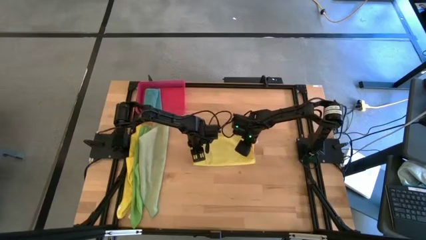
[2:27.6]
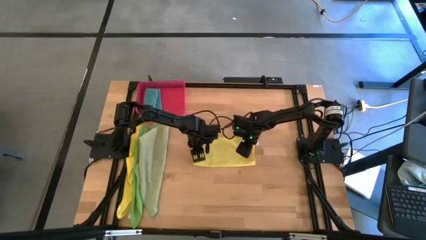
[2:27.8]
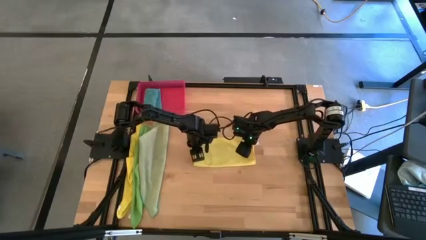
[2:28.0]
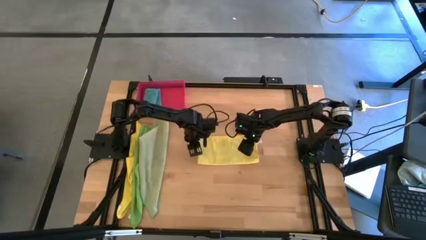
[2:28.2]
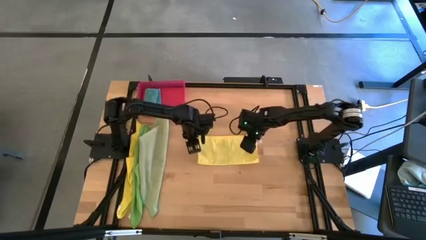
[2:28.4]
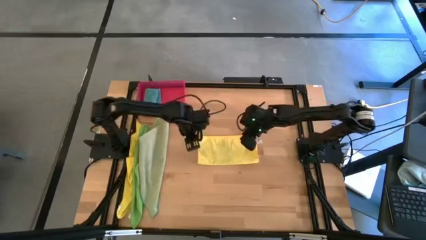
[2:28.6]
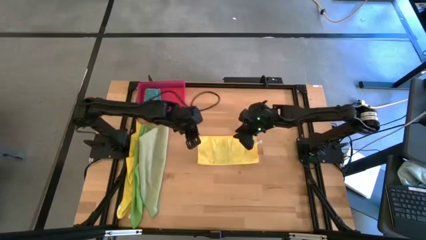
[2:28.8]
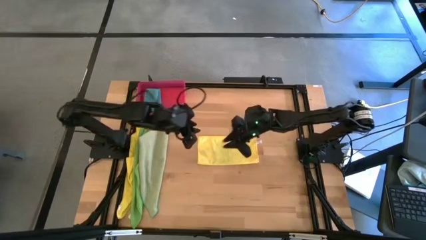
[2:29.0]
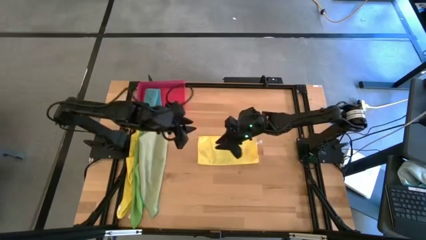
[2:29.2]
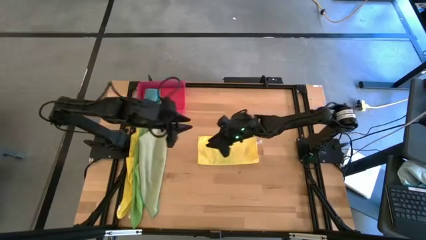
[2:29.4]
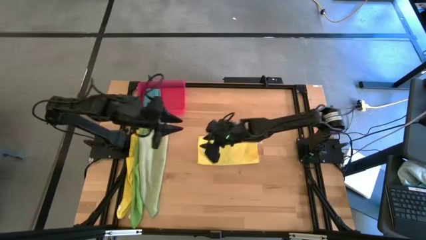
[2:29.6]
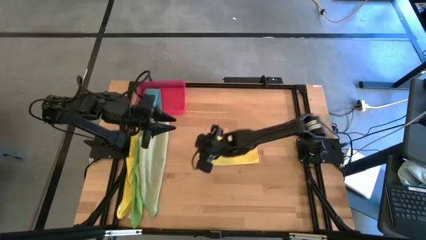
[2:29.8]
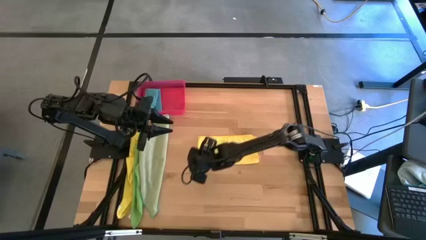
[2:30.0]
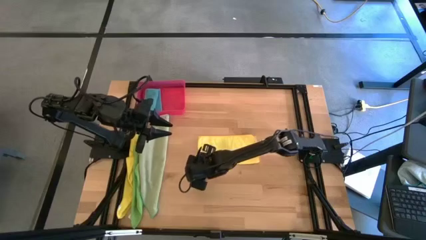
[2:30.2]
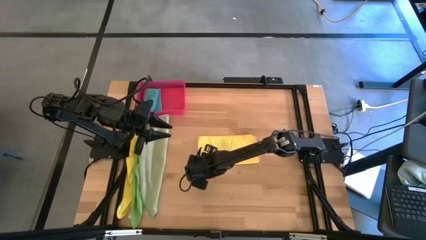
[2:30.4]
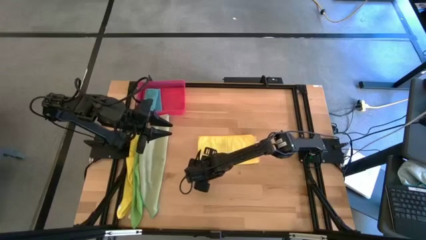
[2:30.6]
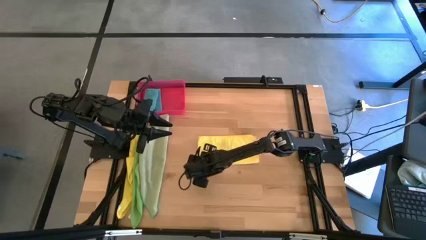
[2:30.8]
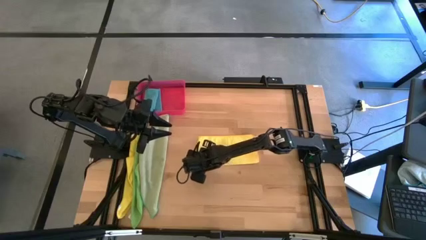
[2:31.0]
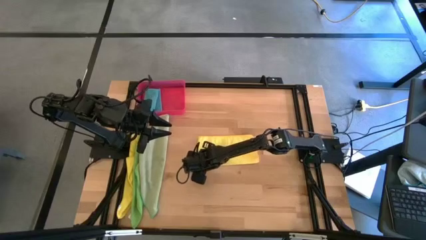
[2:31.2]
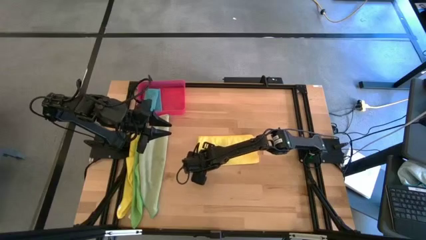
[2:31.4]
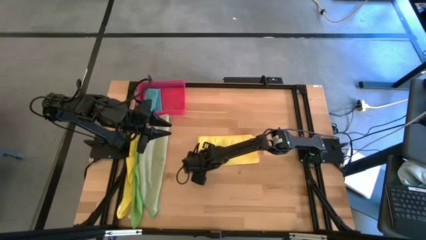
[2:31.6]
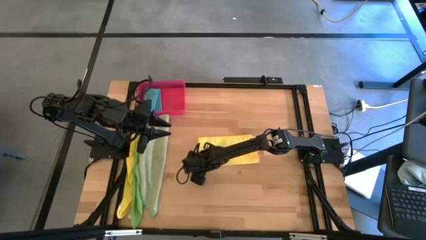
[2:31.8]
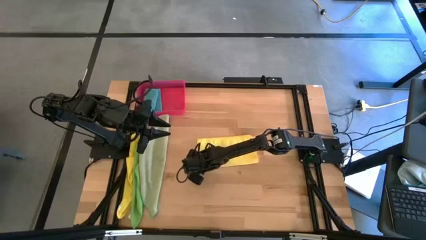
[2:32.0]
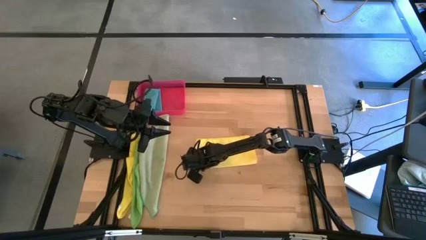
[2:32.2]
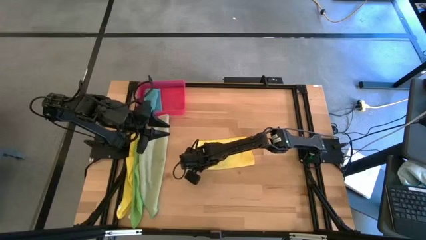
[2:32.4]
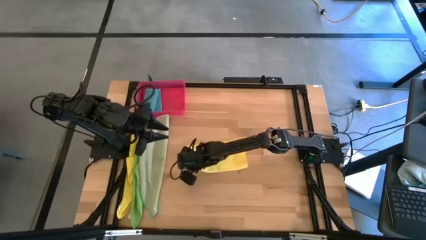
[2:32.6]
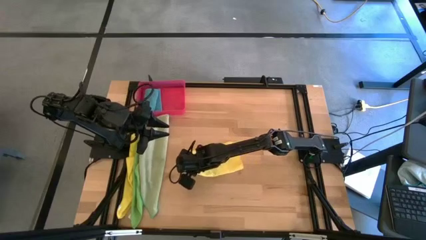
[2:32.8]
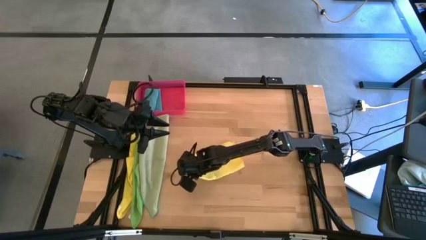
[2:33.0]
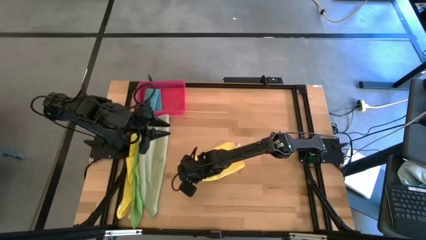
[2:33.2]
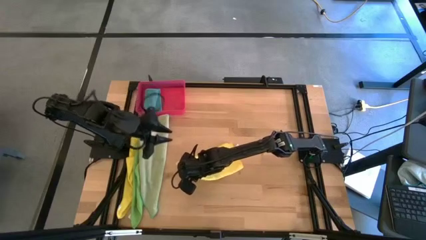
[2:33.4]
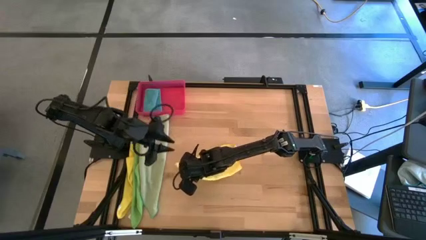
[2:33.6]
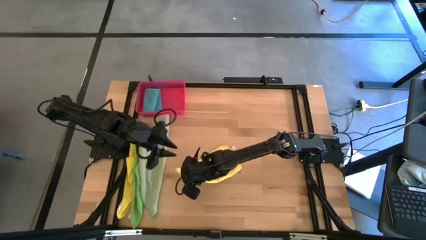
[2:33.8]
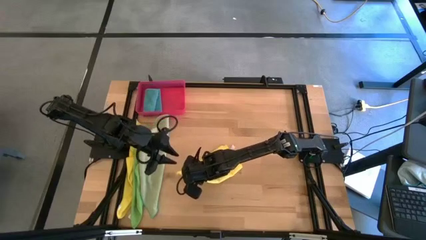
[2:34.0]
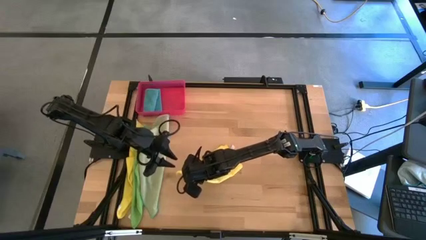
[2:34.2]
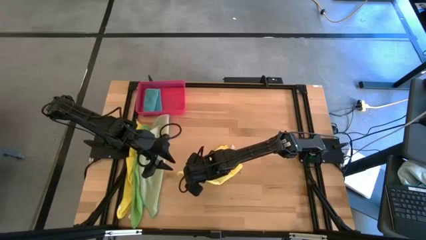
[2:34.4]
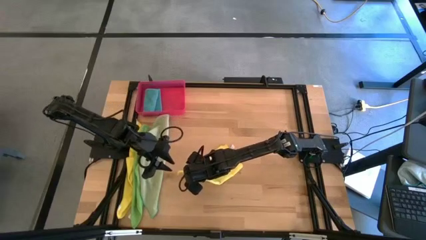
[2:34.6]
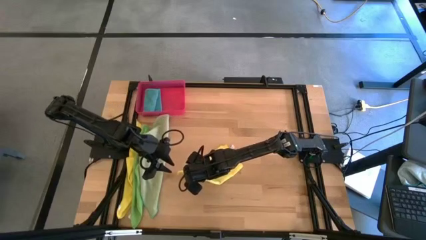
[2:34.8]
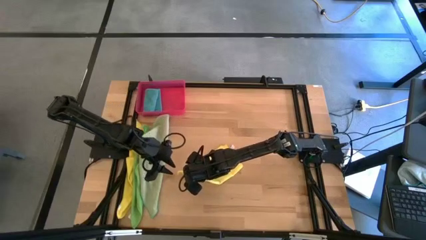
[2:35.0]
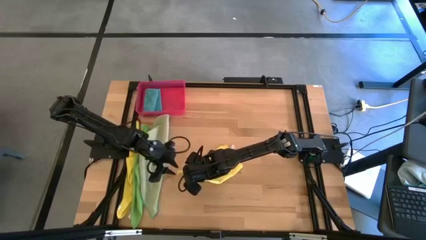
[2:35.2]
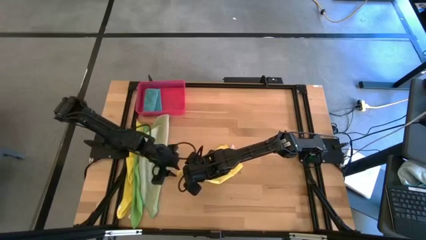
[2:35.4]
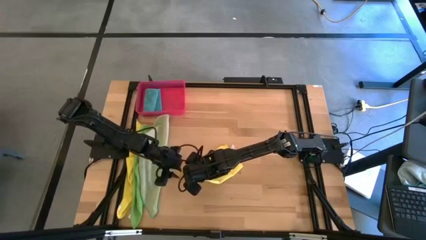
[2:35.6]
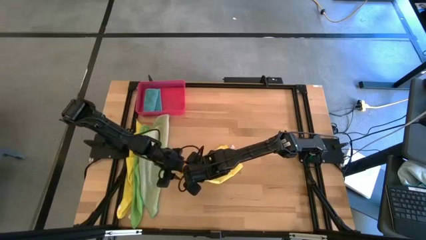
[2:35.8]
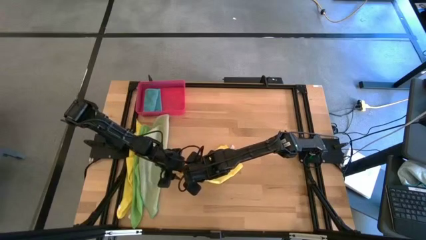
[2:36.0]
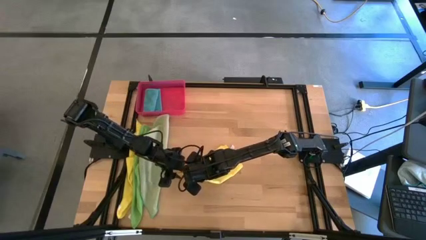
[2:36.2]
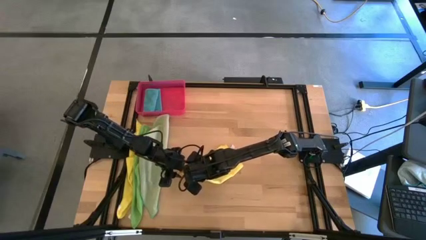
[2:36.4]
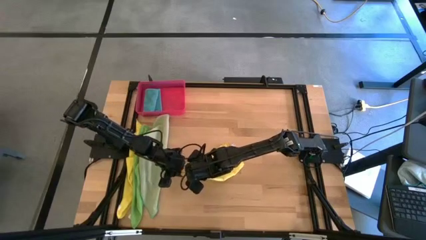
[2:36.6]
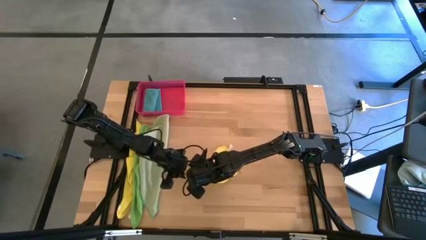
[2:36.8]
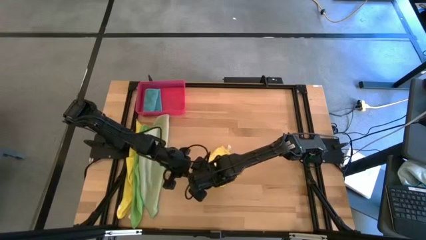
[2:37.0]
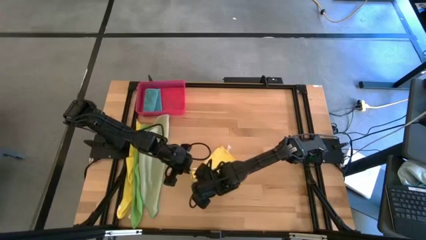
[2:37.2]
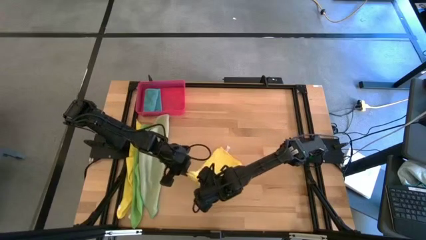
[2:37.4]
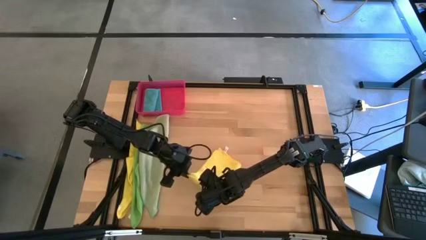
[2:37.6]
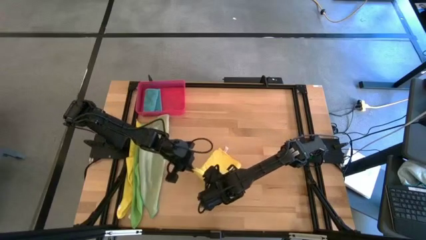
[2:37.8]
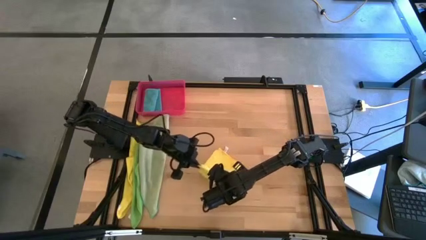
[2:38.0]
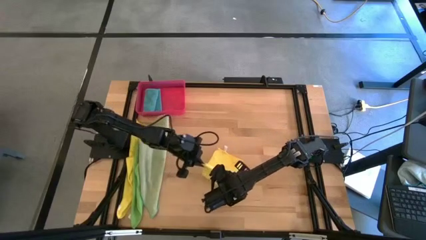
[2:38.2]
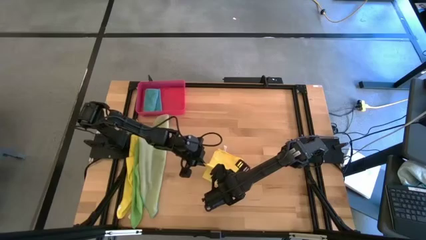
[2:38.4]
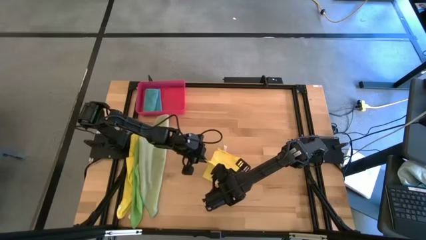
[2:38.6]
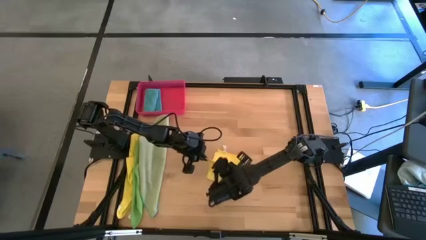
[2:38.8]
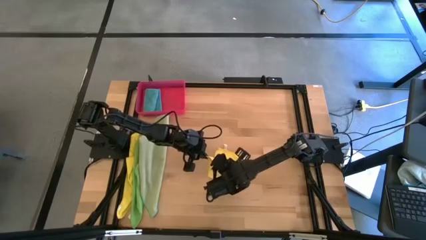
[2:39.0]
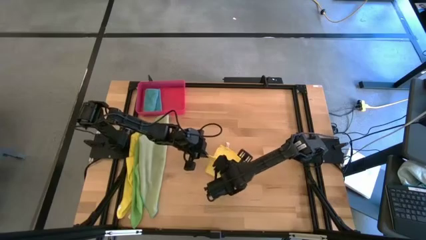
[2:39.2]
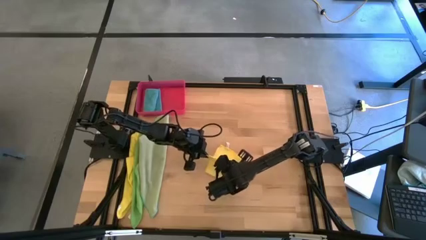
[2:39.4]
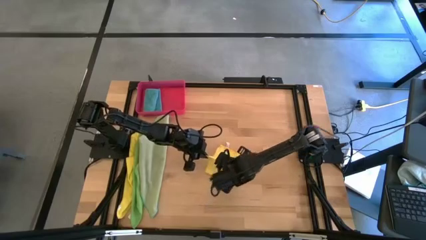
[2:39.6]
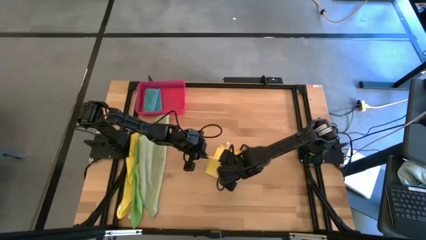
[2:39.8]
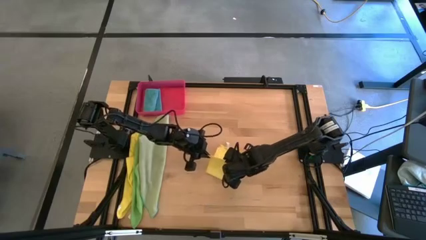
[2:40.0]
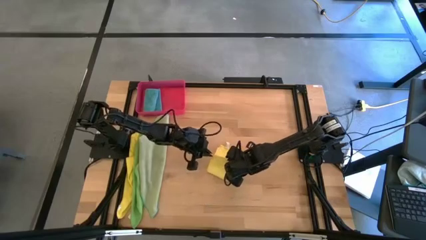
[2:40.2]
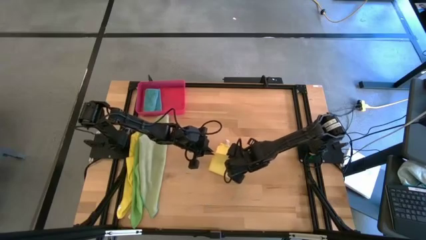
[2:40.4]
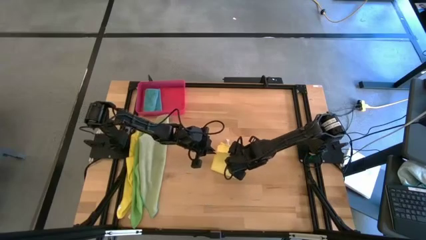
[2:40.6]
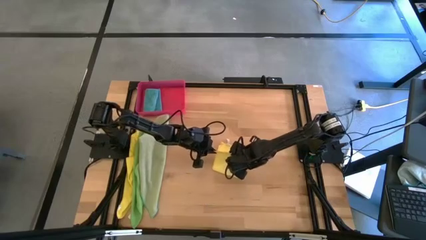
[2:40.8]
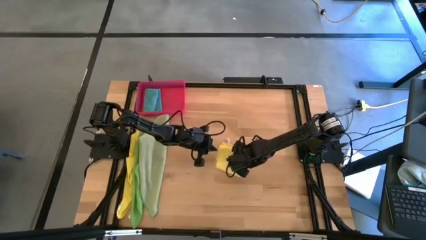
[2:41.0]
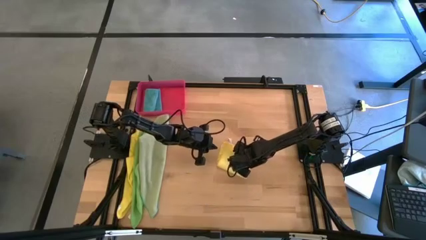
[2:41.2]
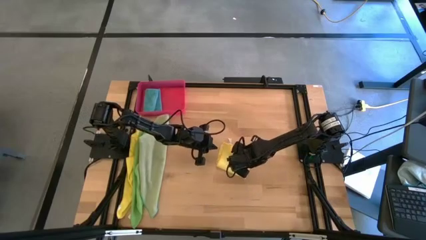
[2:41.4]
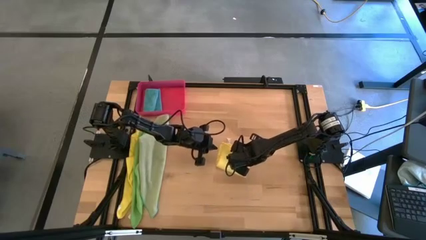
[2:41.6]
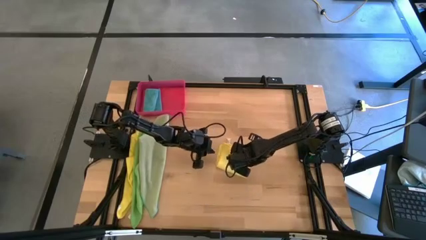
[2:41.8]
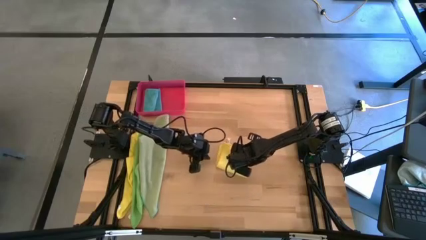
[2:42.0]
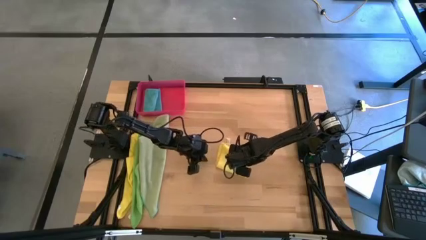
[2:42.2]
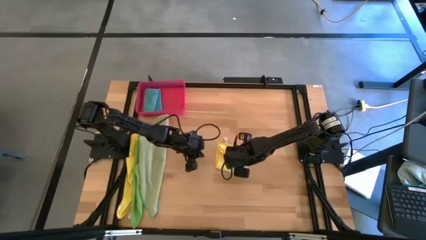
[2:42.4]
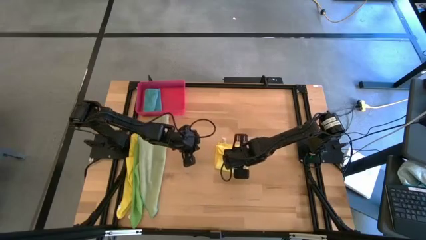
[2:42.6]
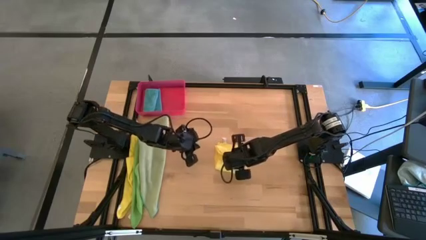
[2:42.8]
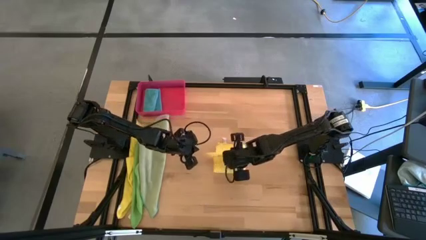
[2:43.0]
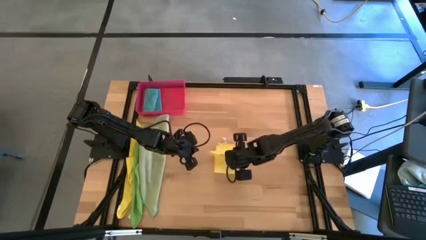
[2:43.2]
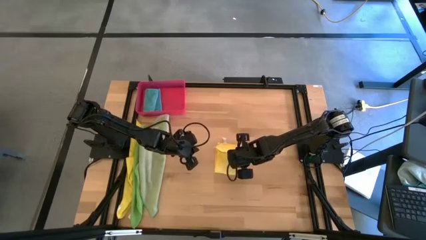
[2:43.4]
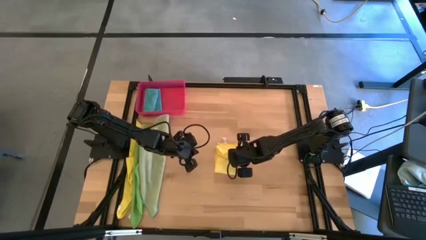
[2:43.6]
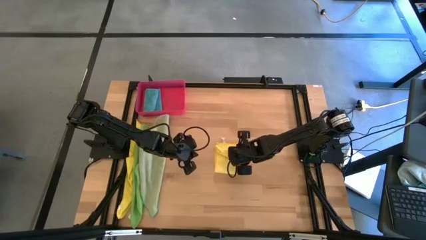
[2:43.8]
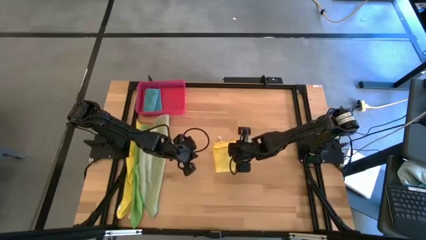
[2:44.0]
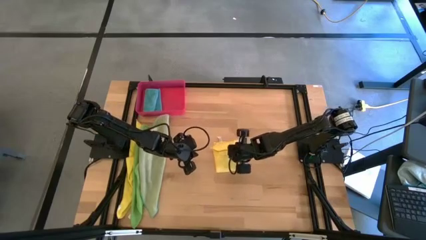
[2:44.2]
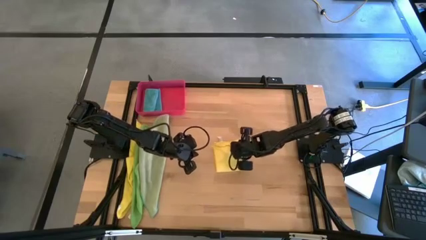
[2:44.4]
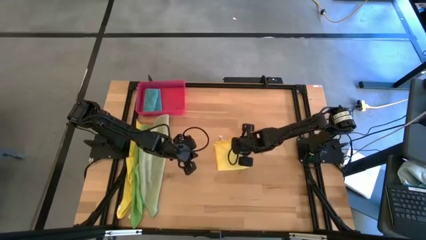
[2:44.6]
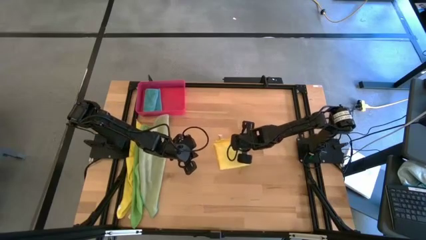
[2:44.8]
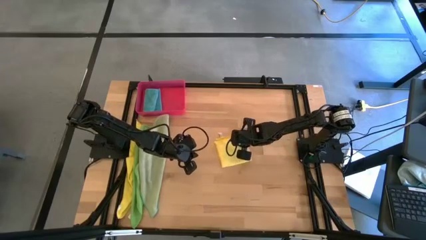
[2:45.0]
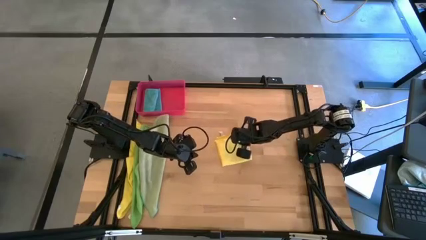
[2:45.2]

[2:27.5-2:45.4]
Task: Fold microfiber towels
Fold the right yellow microfiber towel on the table
